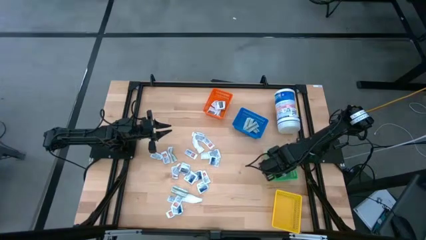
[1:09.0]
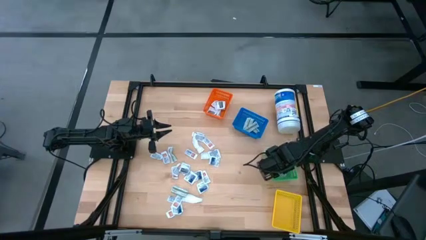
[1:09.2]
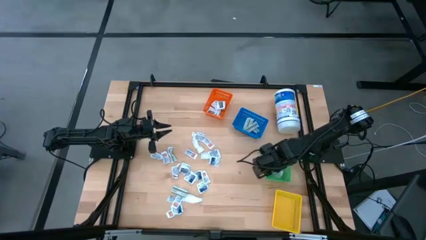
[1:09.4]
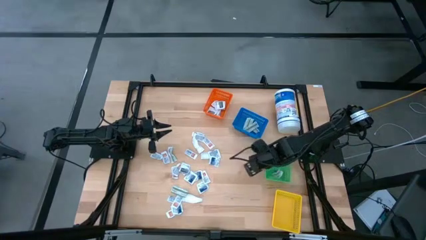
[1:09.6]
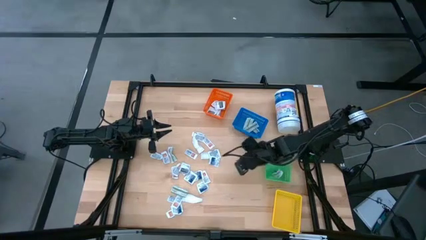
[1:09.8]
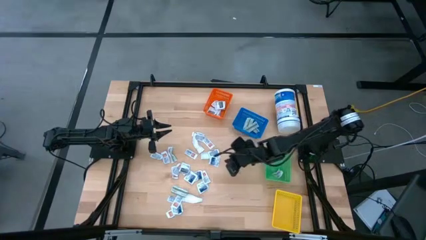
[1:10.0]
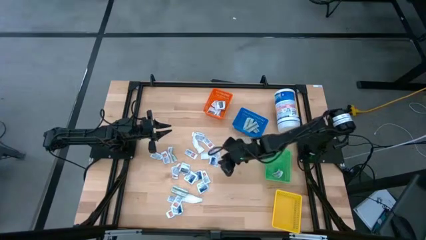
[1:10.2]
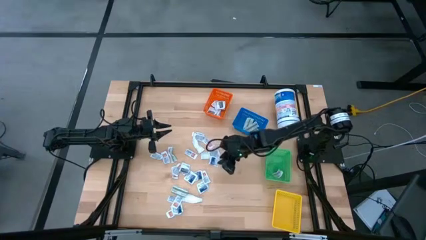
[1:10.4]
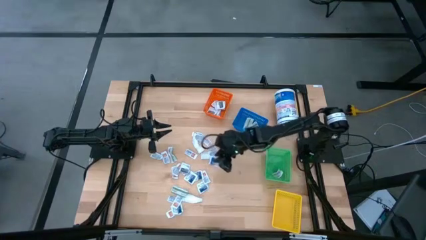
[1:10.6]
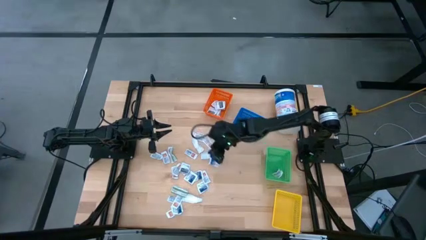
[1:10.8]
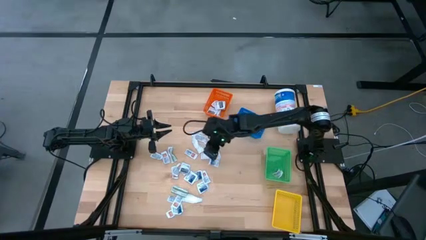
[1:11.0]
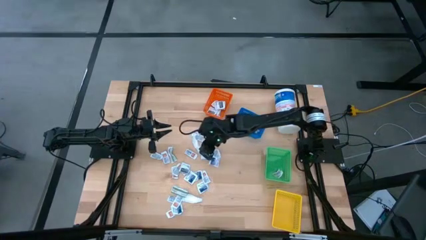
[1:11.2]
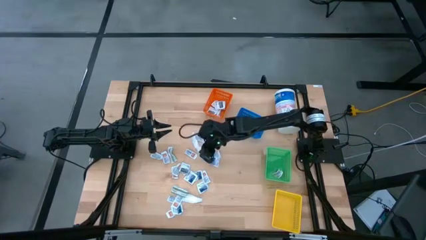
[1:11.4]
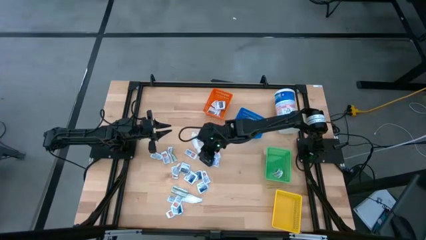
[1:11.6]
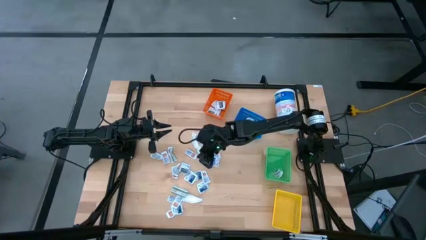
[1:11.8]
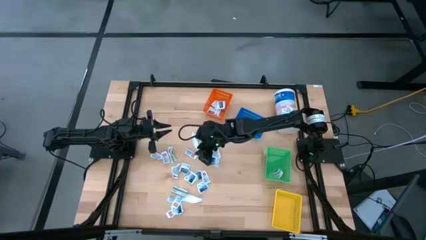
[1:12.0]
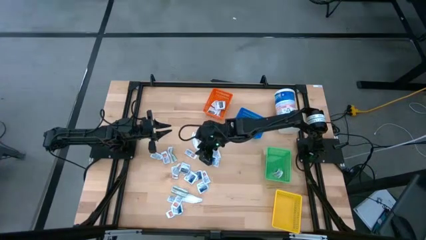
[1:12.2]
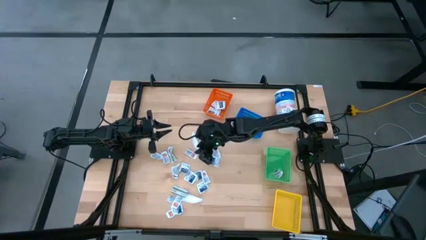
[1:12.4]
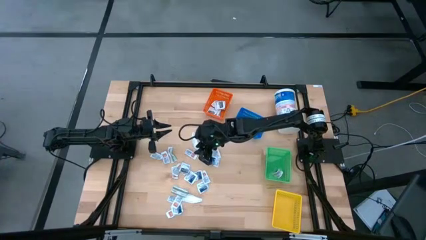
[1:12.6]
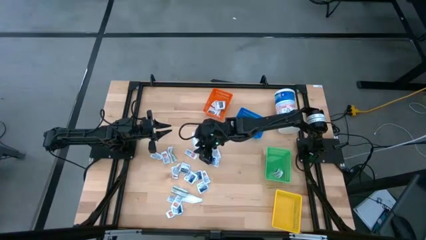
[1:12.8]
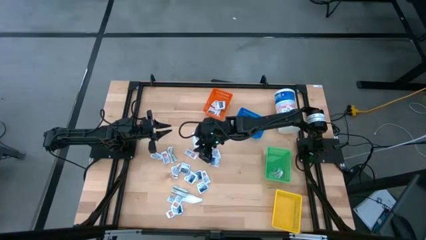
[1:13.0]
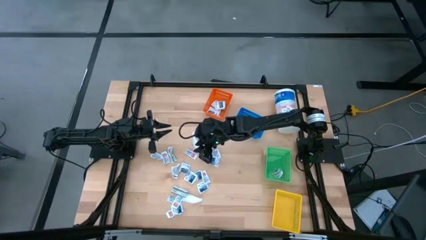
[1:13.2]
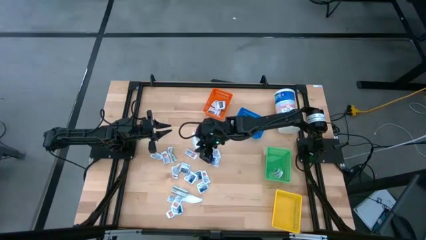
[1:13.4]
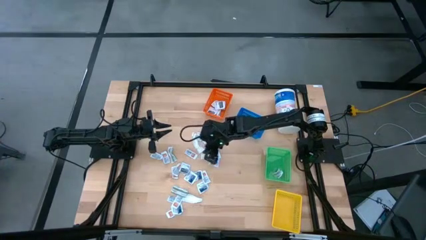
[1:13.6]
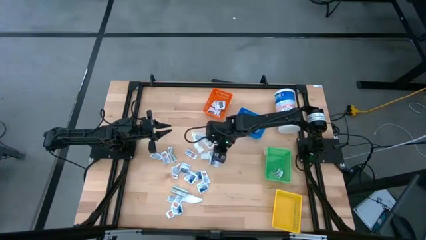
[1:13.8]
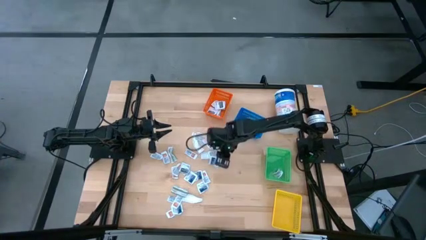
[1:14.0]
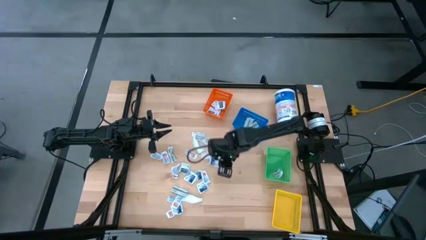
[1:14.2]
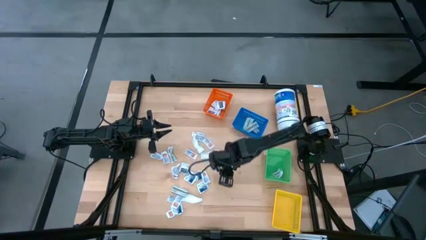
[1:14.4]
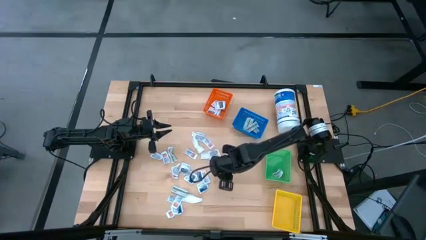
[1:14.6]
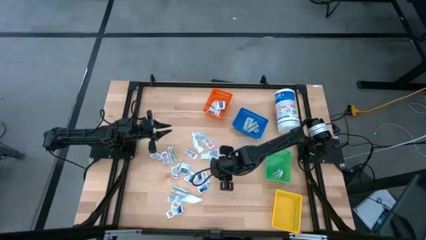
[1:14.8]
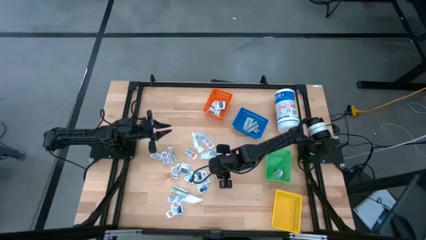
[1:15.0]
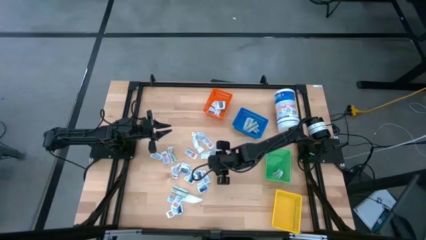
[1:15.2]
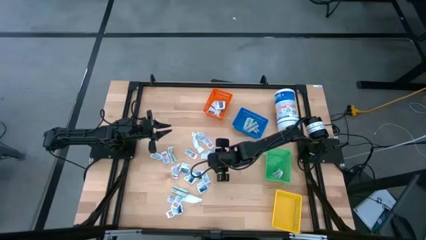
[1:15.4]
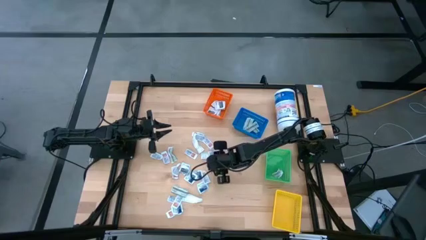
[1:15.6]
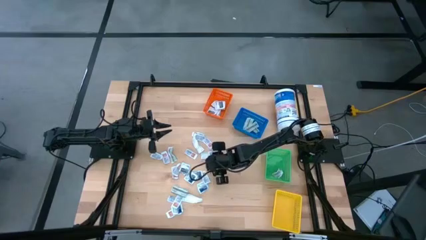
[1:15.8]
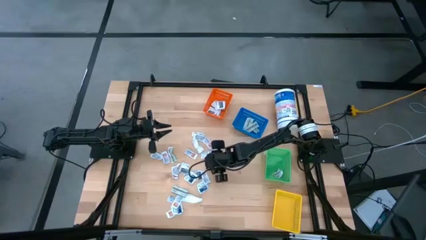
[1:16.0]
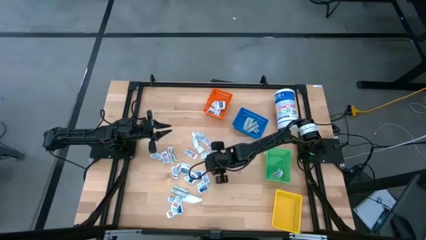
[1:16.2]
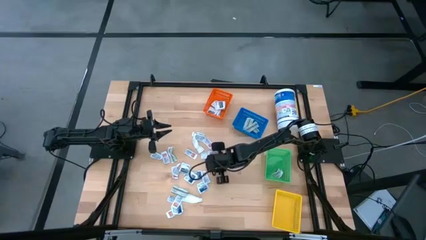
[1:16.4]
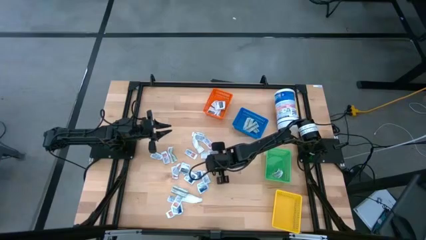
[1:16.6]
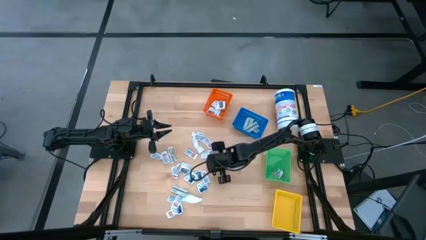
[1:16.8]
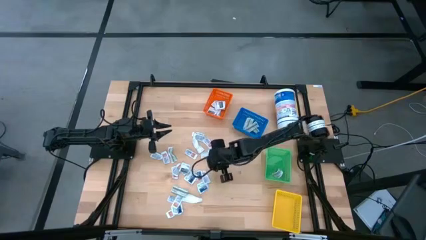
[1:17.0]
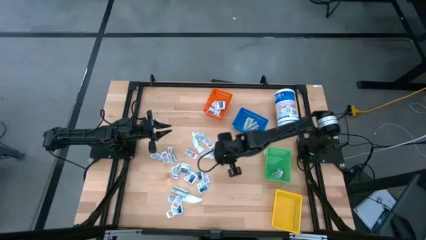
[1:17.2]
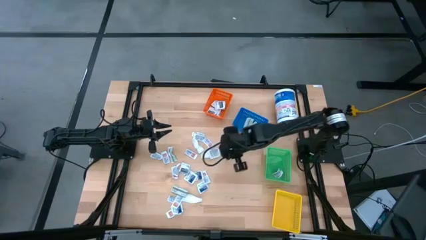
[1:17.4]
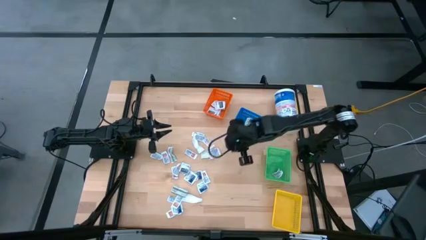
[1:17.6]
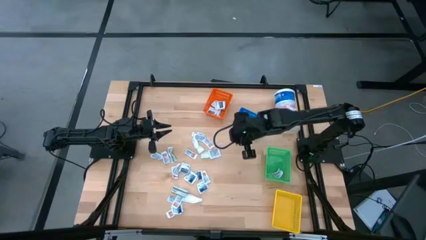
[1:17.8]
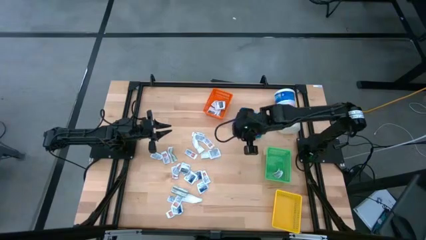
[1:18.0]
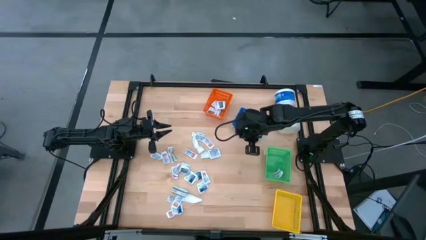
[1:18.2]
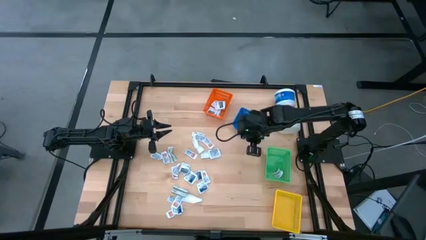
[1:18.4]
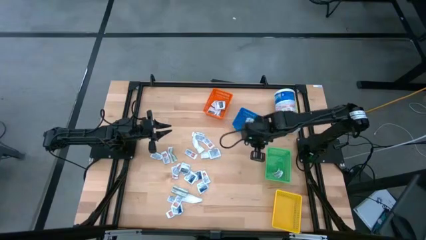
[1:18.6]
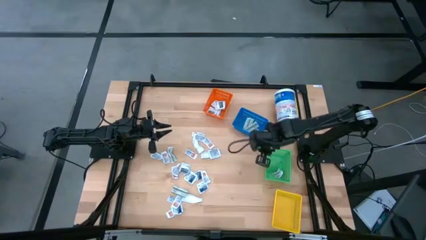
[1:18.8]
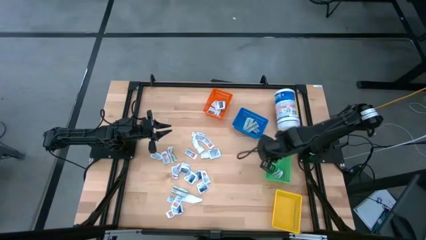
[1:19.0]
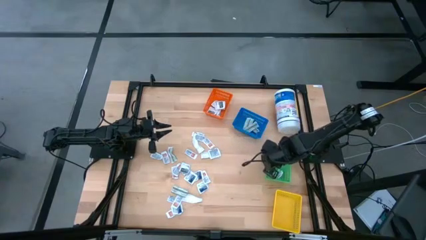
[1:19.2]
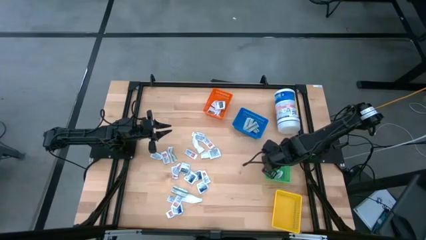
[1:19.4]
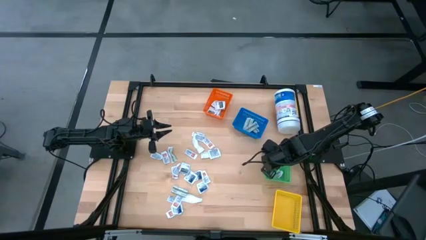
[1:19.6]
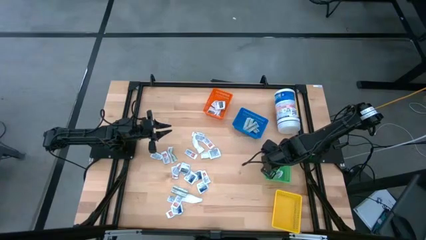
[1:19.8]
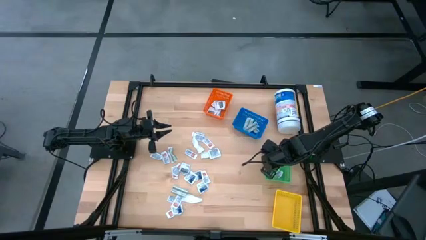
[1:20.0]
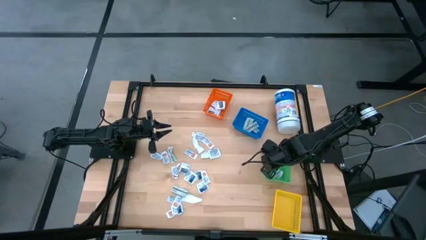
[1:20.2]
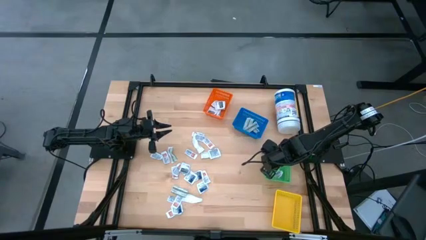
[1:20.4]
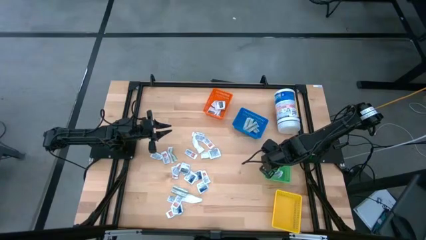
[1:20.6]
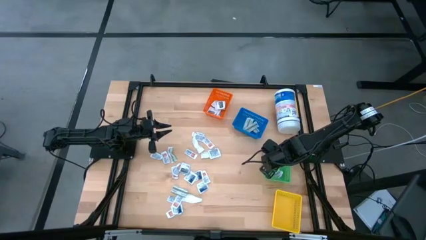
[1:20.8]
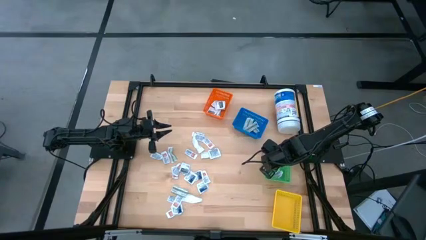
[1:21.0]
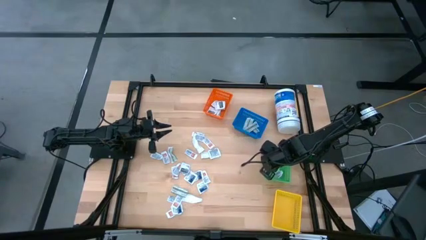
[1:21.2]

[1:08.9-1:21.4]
Task: Pick & Place First Aid Supplies
Put the blue alcohol pad into the green basket

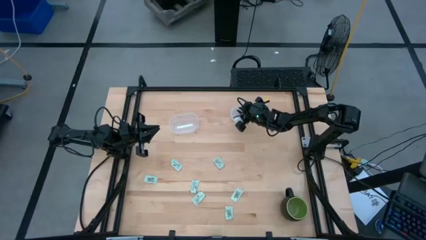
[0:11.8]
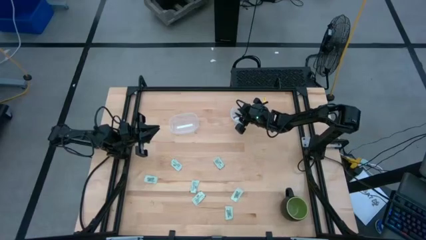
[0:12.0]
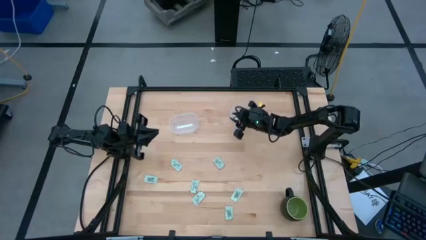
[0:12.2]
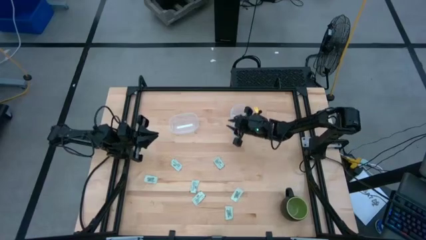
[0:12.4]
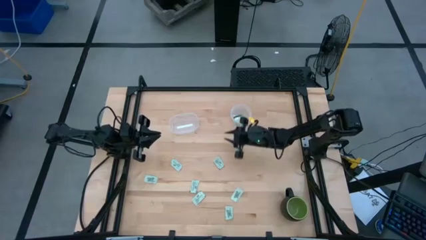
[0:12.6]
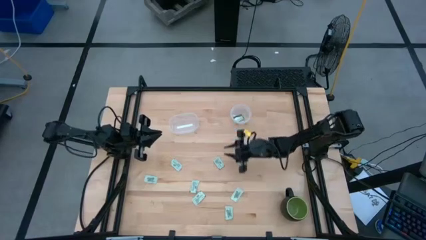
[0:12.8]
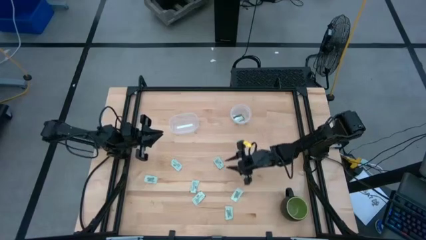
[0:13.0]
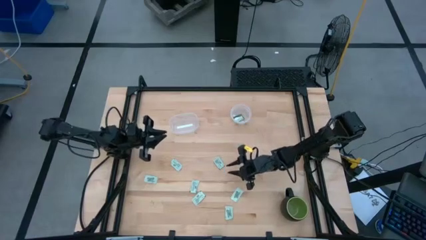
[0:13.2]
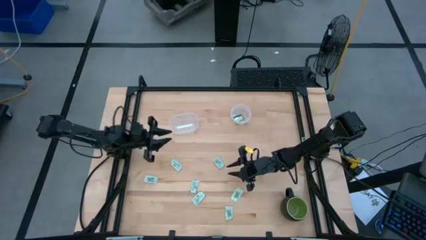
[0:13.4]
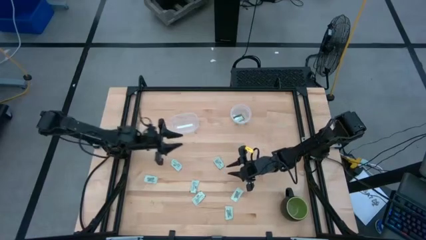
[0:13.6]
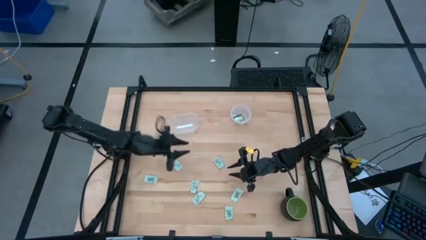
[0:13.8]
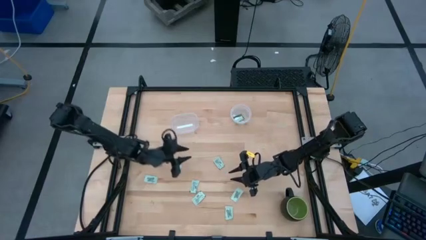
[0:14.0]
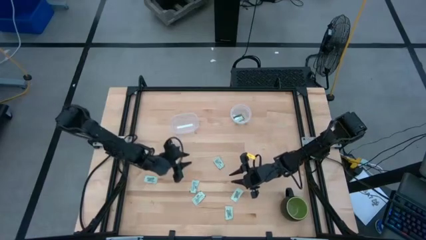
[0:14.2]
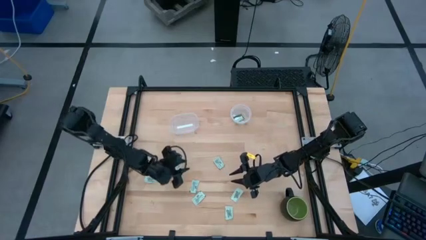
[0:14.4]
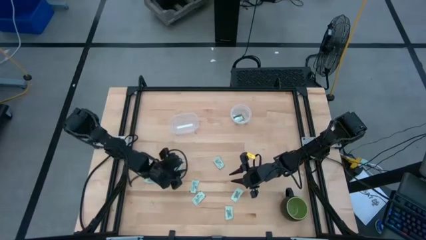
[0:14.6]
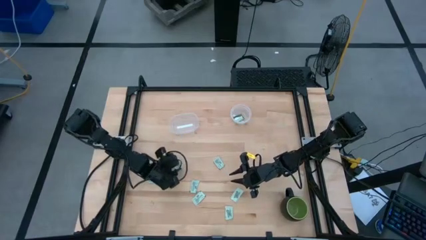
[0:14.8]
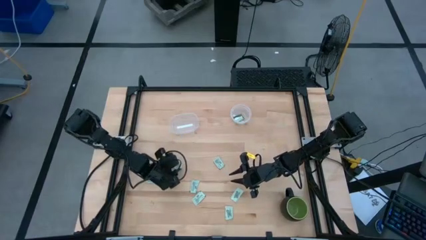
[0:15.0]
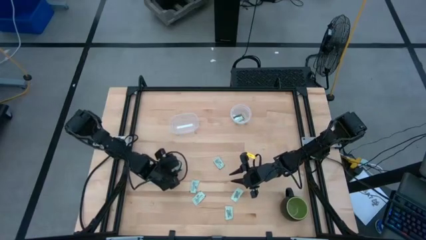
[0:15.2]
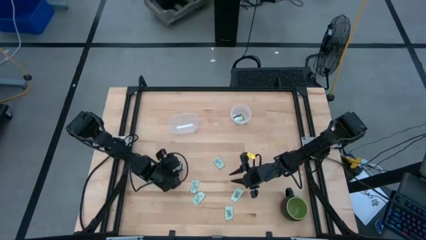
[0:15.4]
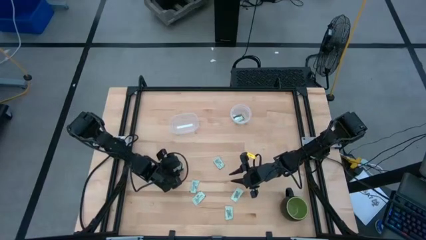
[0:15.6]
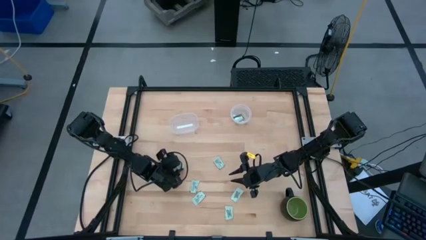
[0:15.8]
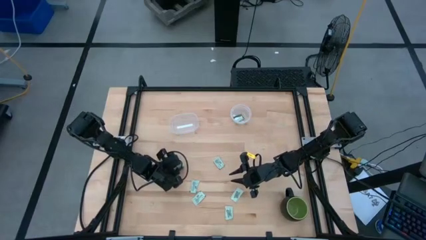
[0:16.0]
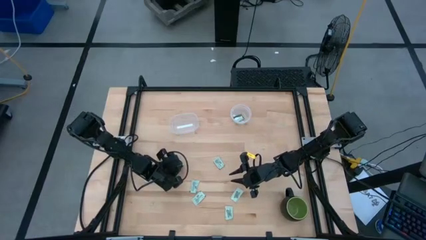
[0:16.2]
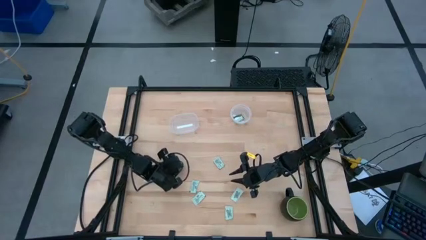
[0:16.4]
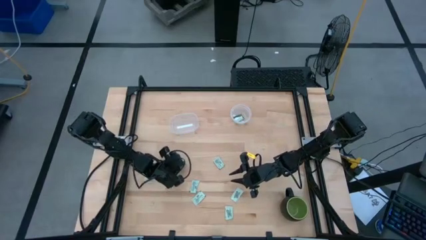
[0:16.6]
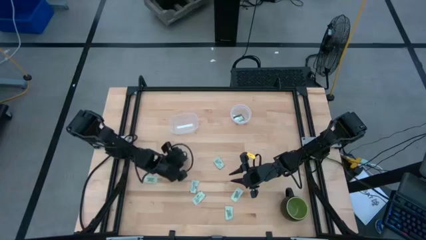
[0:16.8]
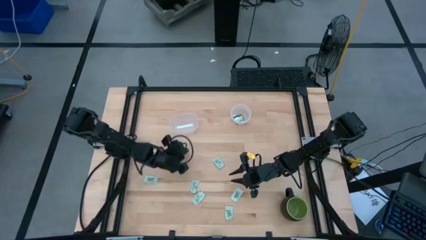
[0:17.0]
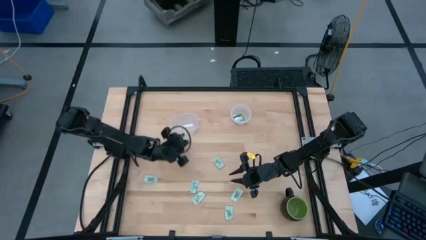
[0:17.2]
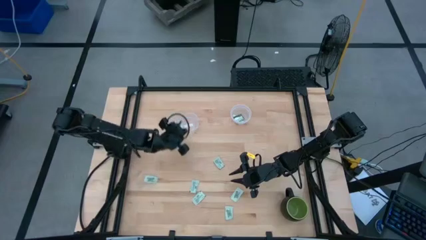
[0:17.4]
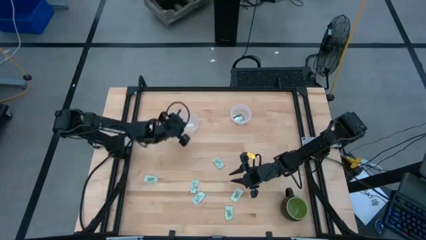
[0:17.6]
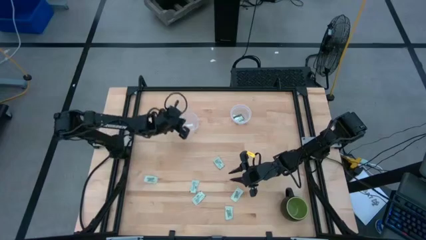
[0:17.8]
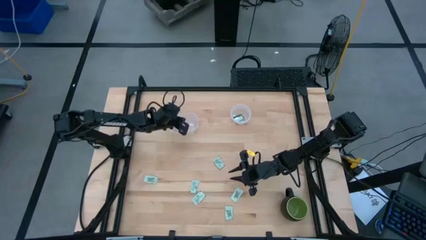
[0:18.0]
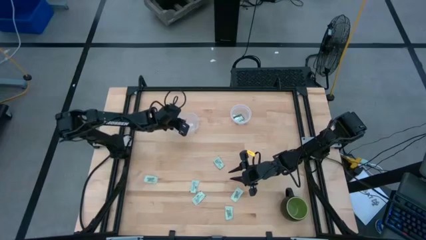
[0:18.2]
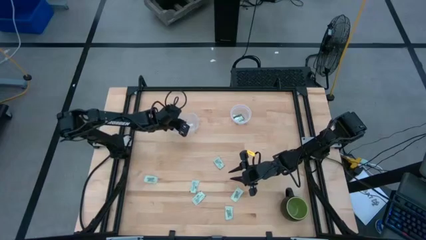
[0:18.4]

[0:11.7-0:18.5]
Task: Pick and place Stevia / Truvia into bins
Put the stevia packet into the left transparent container
